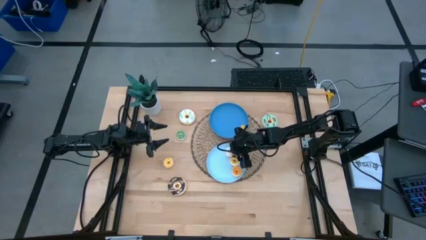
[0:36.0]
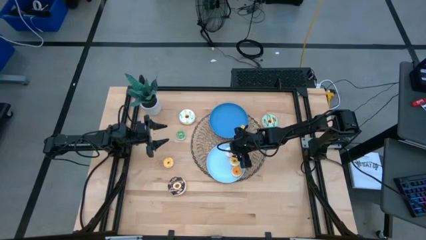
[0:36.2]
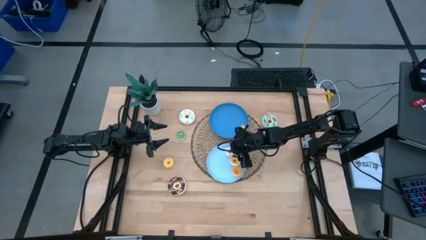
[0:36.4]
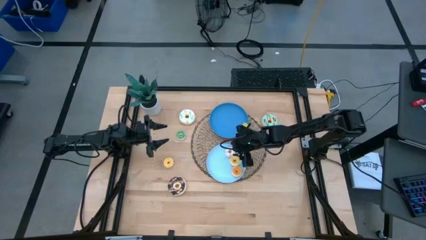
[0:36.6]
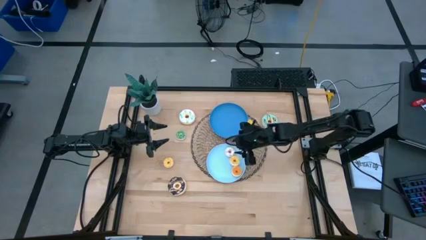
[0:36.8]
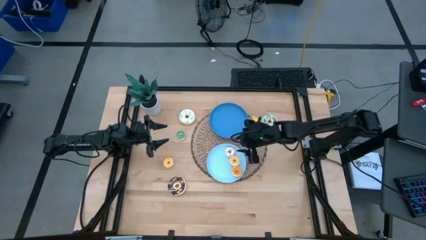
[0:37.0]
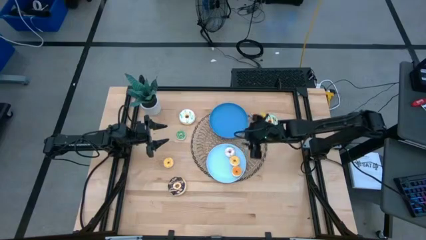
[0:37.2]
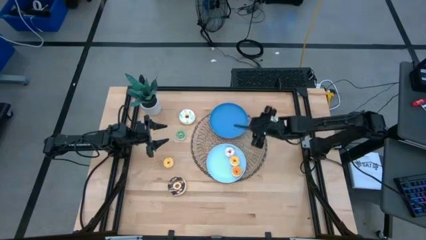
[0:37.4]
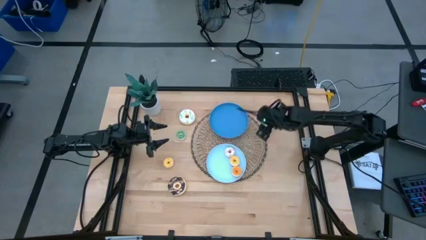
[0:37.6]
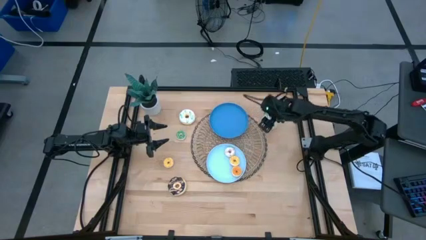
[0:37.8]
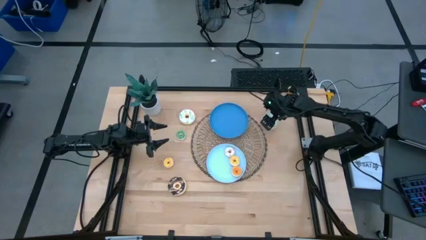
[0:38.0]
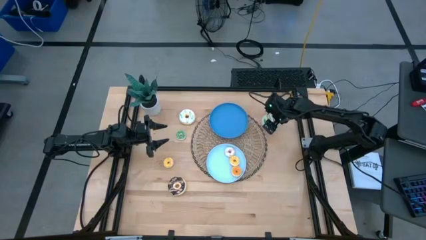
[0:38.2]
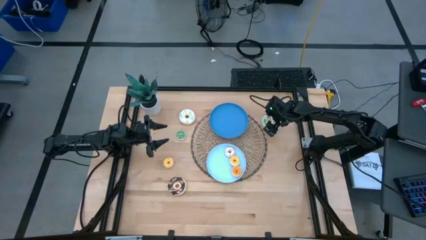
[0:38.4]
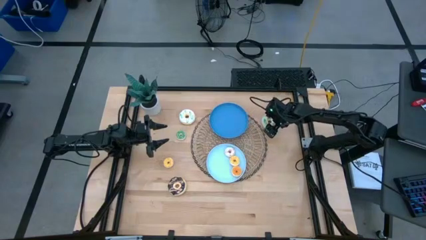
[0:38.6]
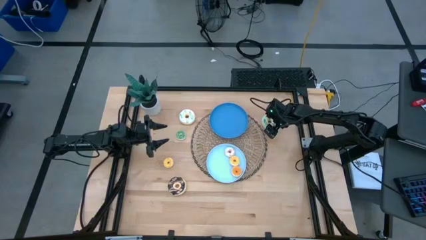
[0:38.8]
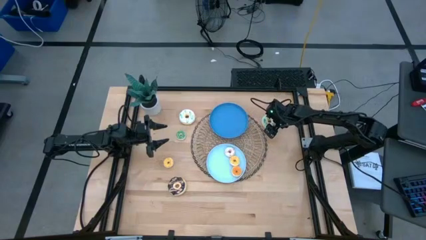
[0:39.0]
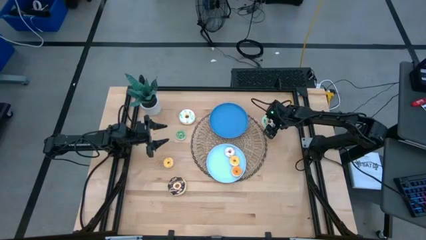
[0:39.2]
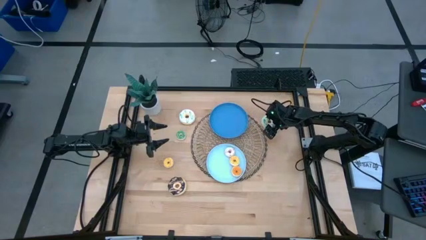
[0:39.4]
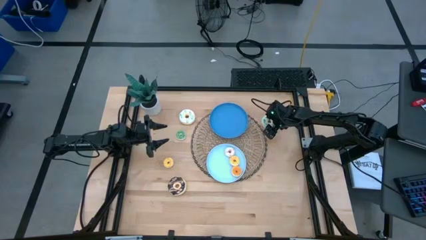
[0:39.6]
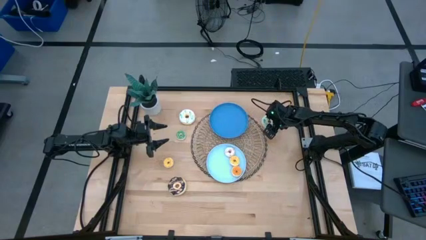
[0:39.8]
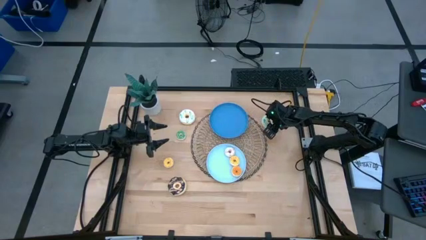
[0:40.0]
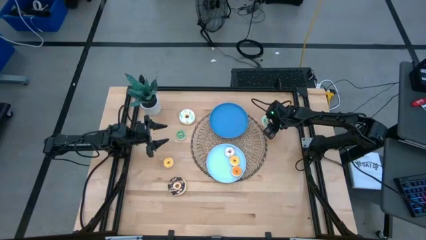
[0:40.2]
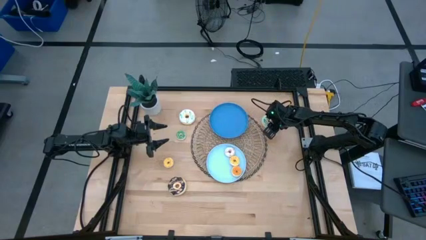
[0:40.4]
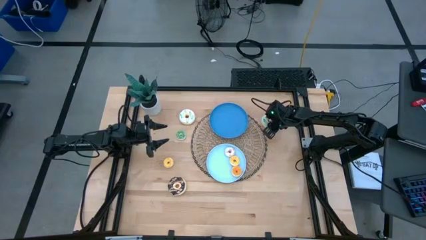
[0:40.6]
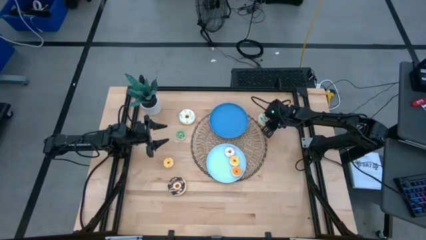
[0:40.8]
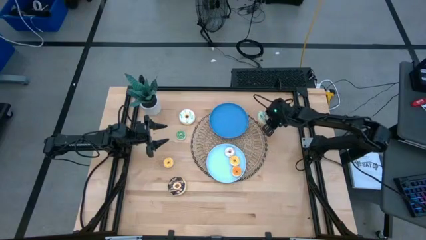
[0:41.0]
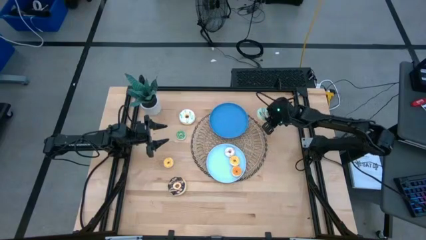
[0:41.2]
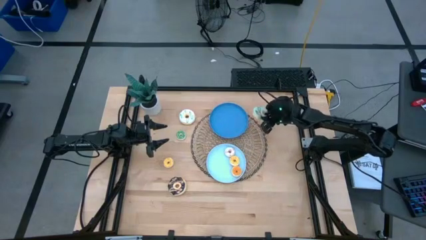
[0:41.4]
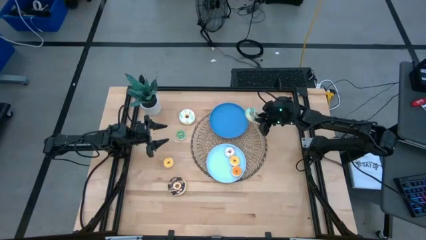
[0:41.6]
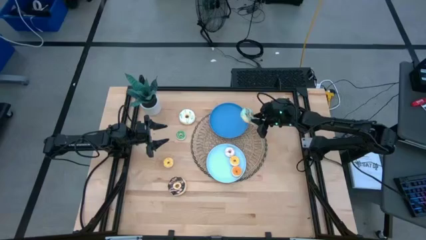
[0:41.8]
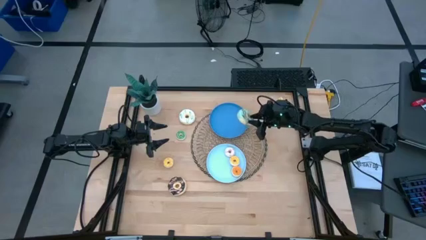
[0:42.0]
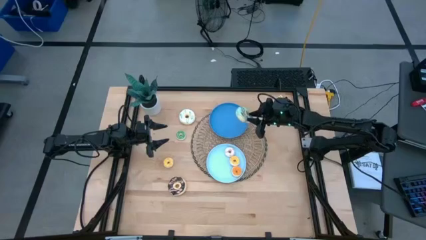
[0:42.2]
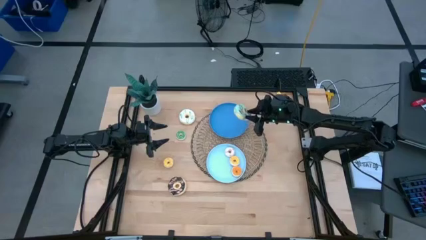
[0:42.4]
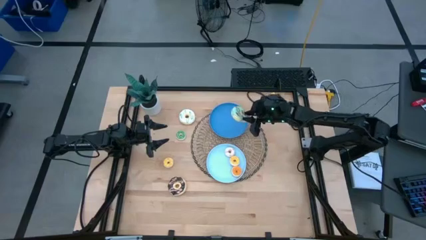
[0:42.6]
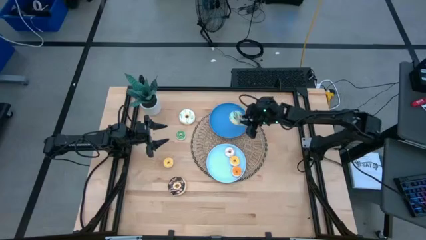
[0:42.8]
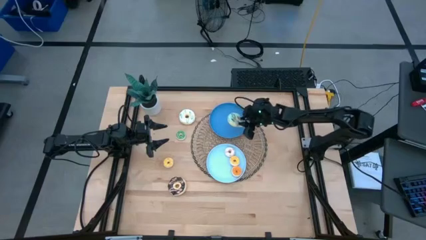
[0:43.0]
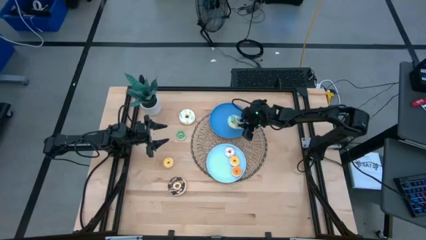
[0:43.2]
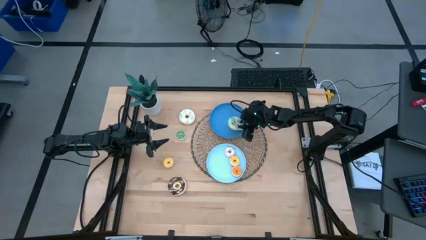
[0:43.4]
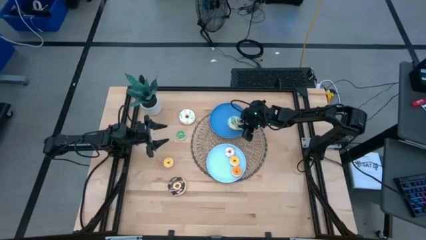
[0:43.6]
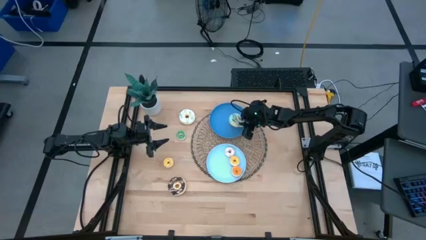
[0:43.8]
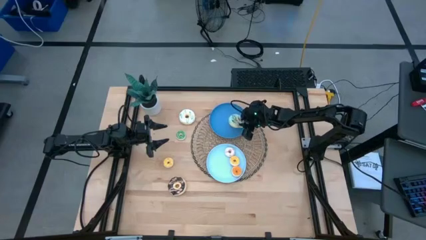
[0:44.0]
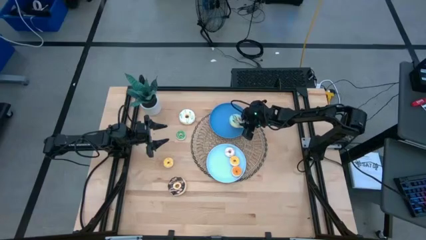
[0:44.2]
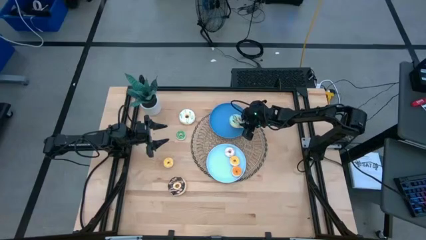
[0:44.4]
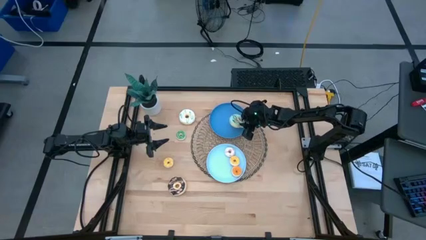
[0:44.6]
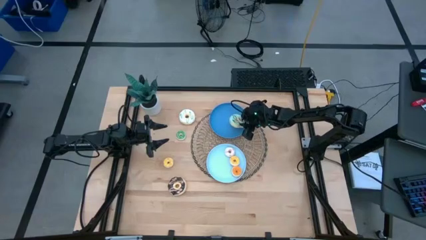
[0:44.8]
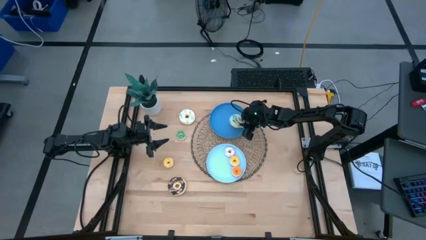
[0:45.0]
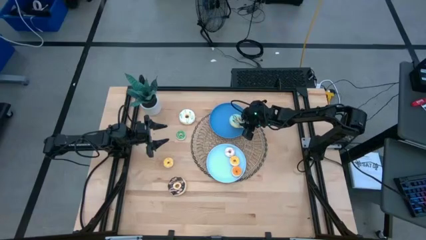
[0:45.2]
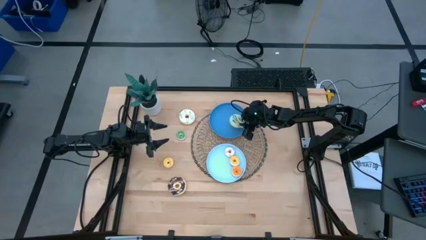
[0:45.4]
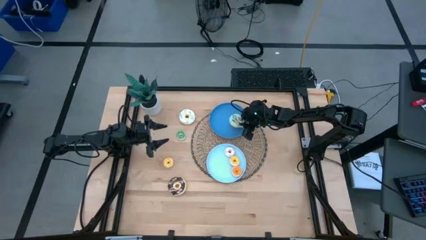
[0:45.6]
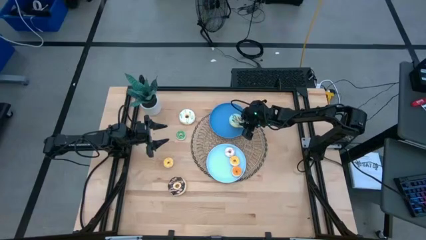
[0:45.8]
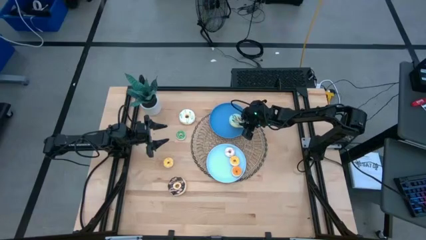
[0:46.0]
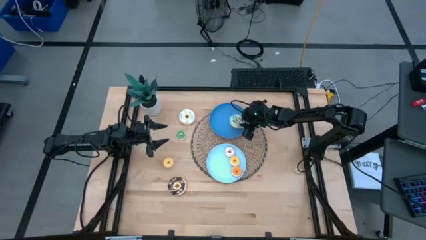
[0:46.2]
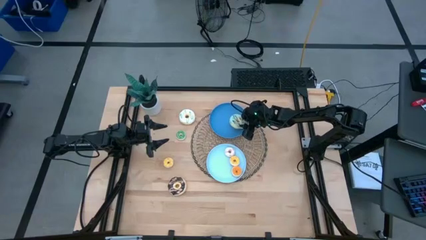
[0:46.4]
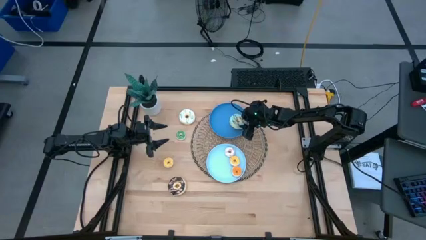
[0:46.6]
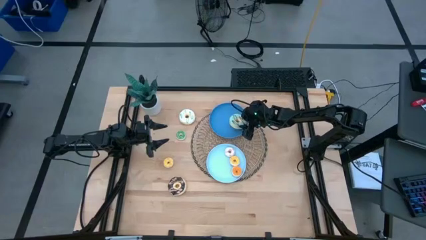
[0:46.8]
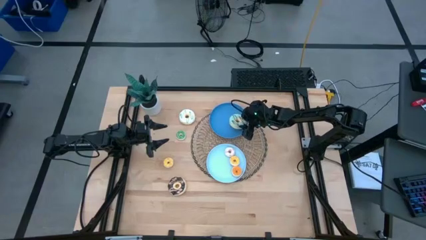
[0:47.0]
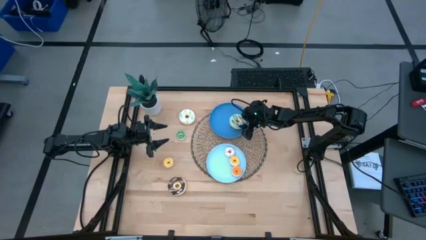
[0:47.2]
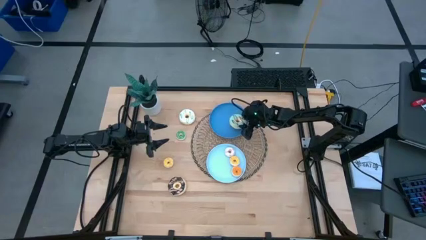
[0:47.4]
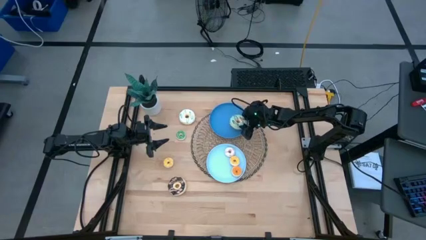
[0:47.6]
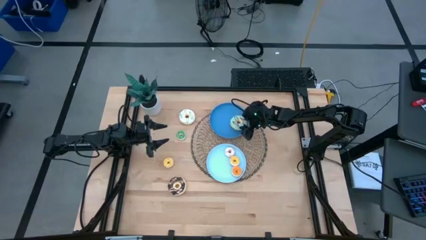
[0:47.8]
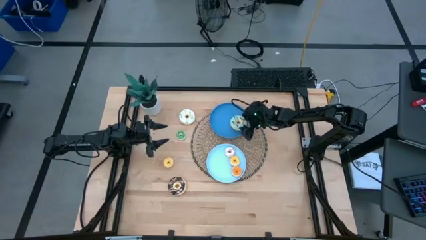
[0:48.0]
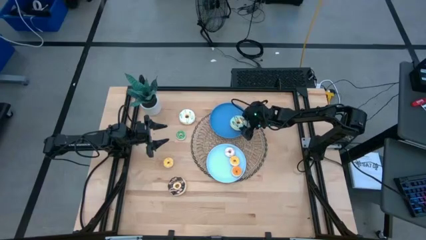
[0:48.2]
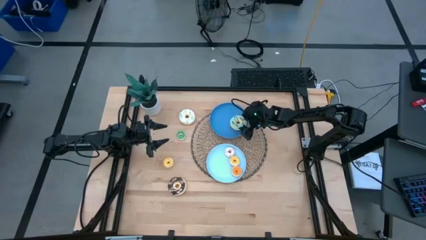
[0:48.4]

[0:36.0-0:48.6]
Task: Pick & Place donuts
Put the big light blue donut on the blue plate
